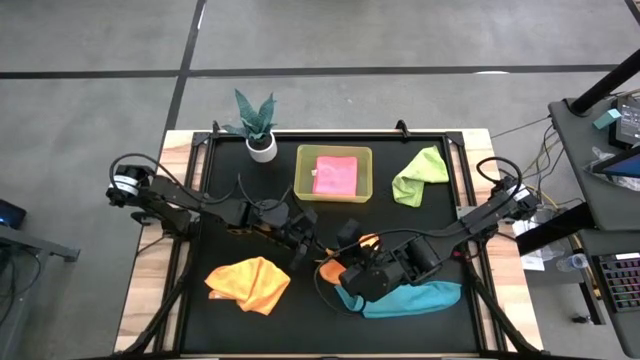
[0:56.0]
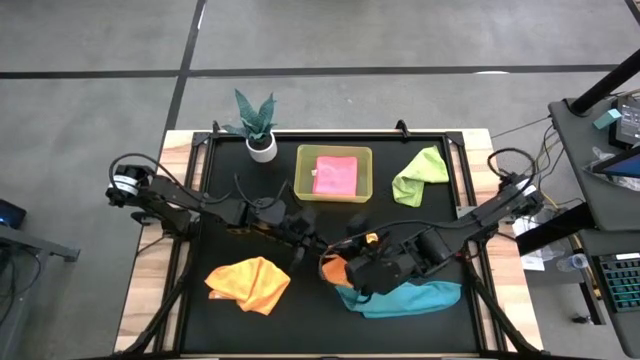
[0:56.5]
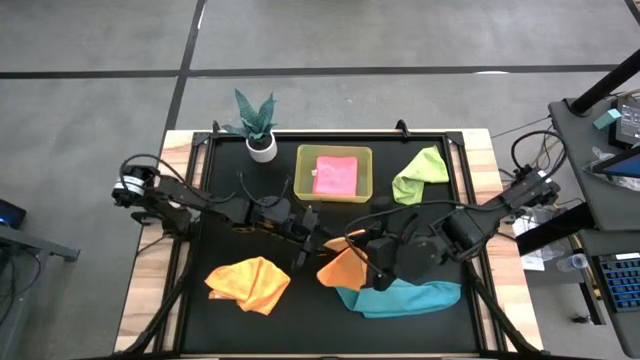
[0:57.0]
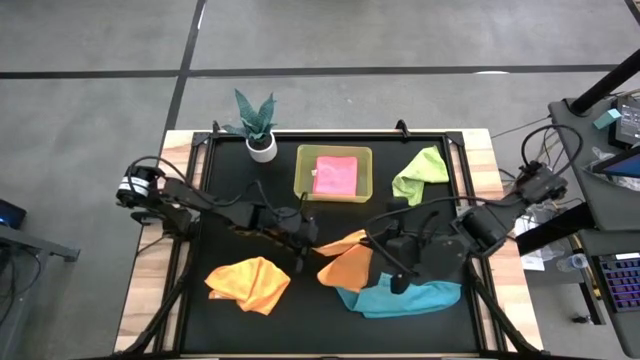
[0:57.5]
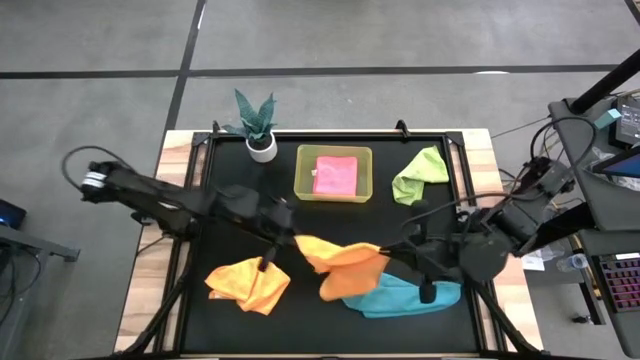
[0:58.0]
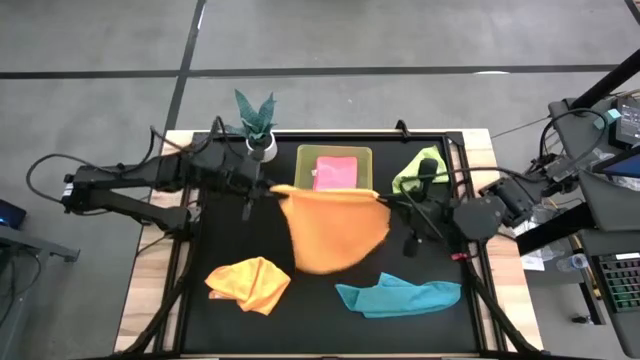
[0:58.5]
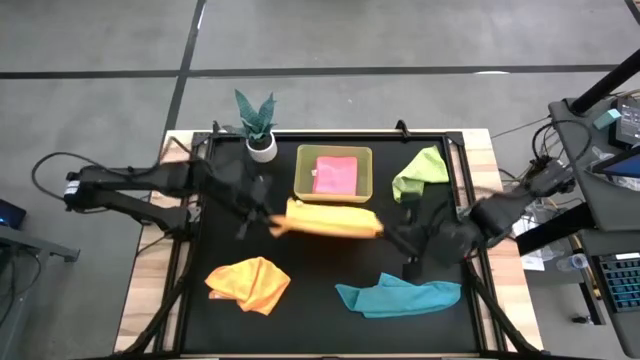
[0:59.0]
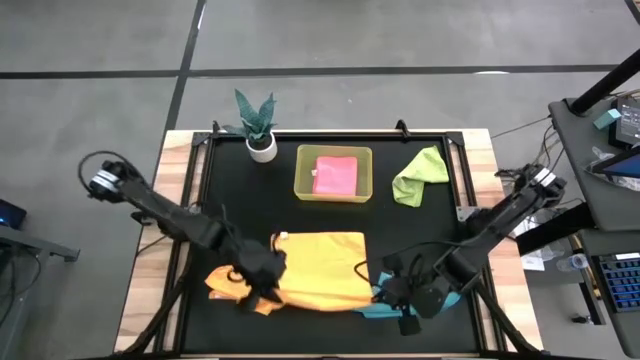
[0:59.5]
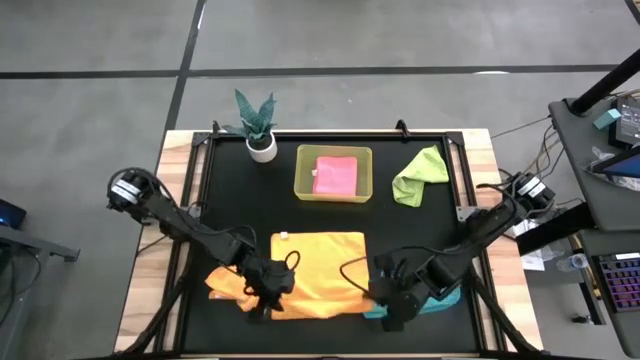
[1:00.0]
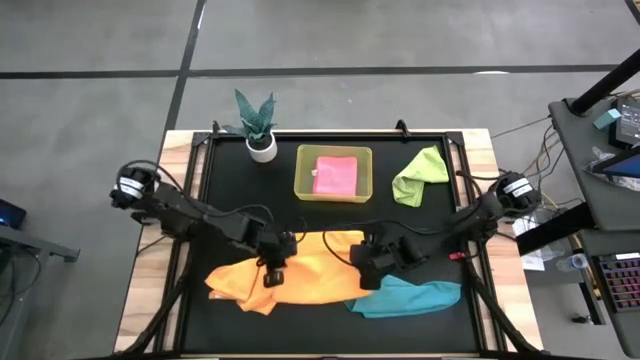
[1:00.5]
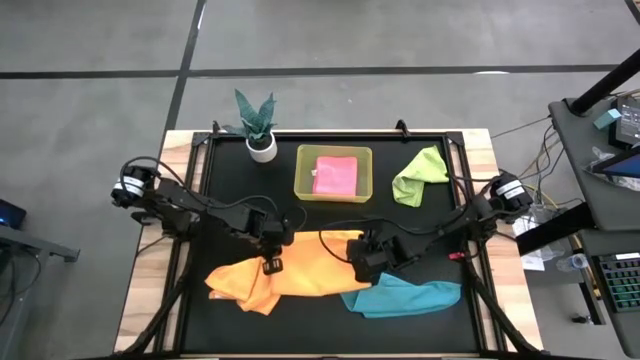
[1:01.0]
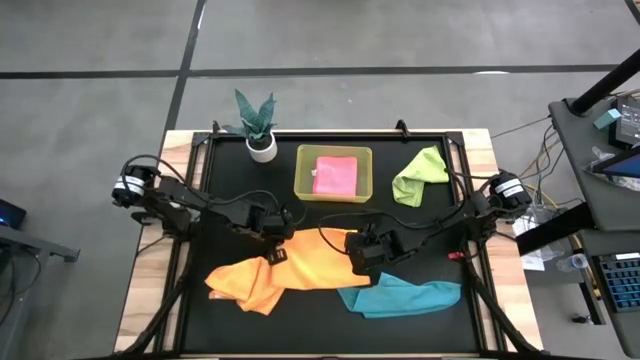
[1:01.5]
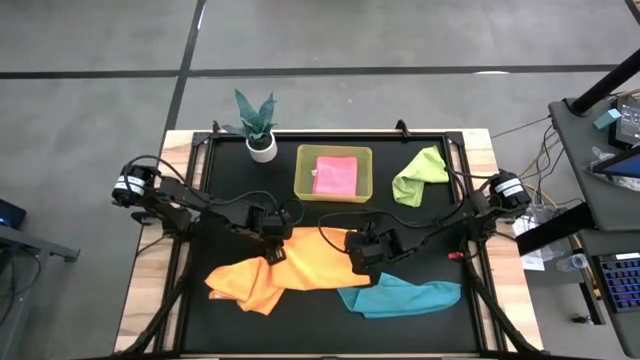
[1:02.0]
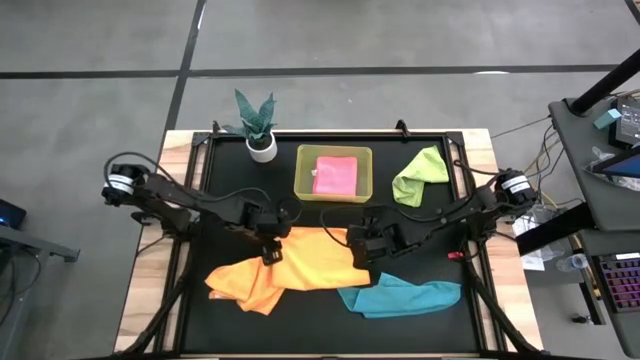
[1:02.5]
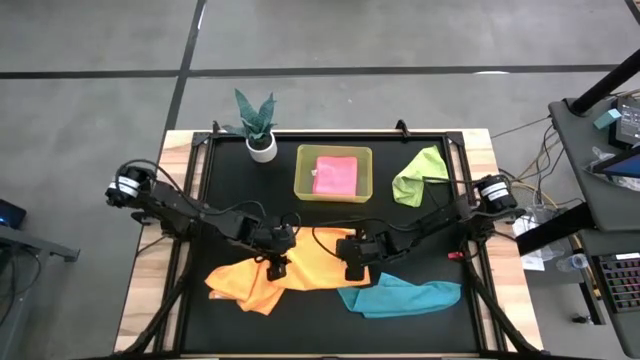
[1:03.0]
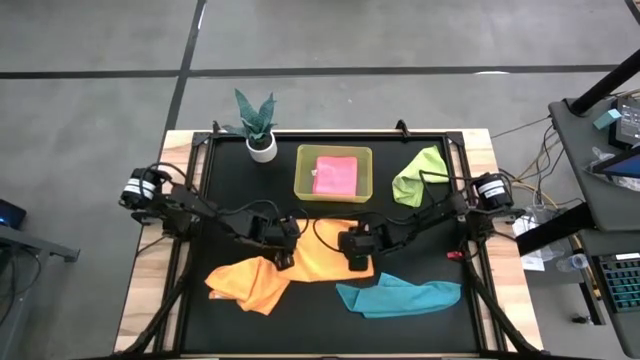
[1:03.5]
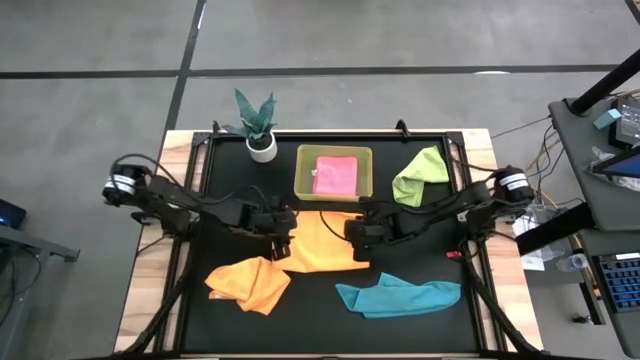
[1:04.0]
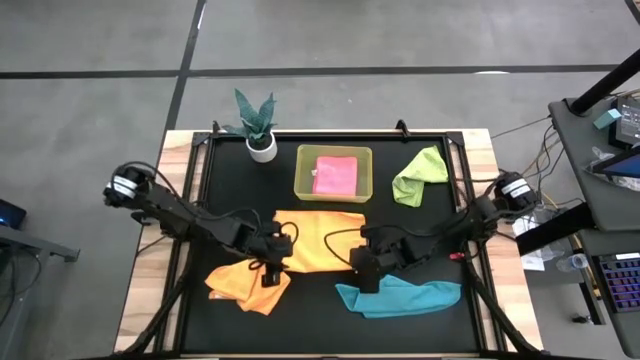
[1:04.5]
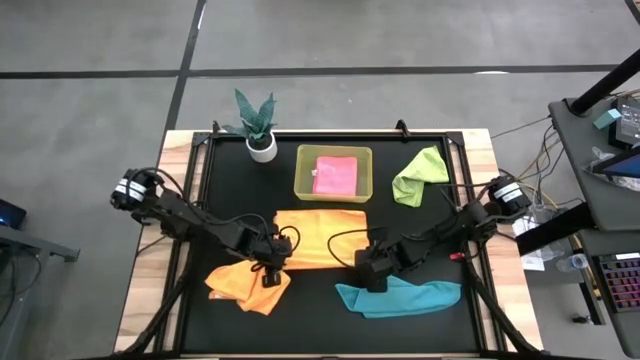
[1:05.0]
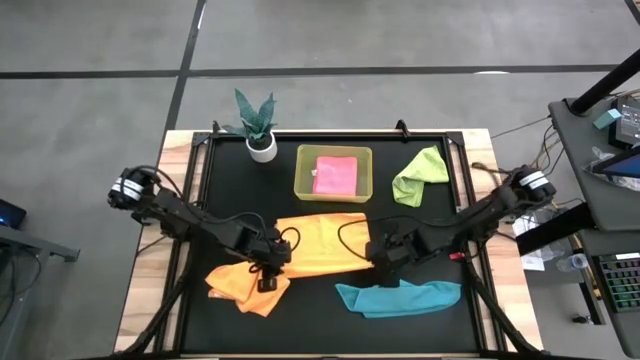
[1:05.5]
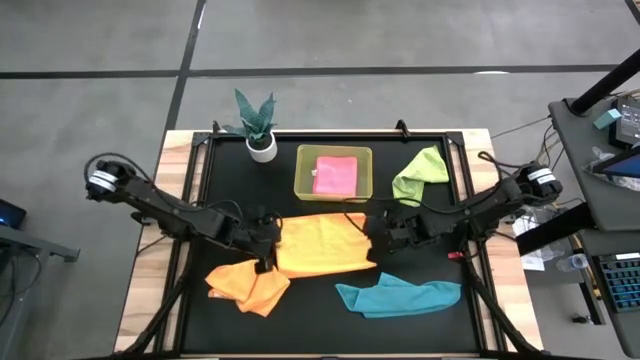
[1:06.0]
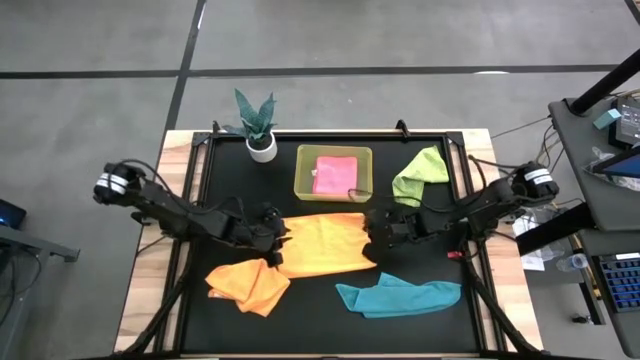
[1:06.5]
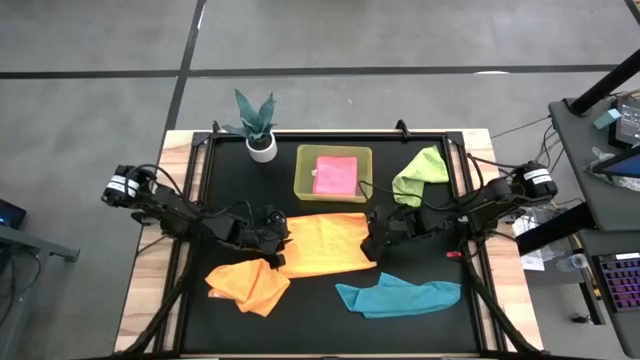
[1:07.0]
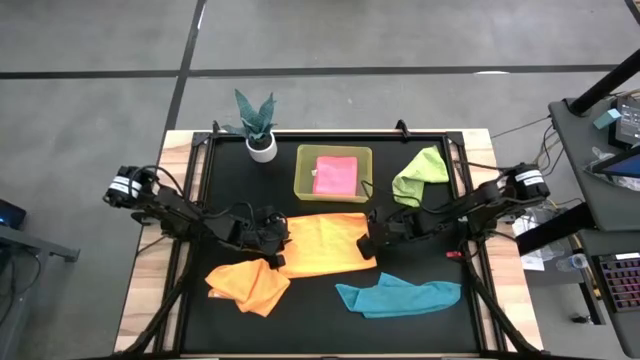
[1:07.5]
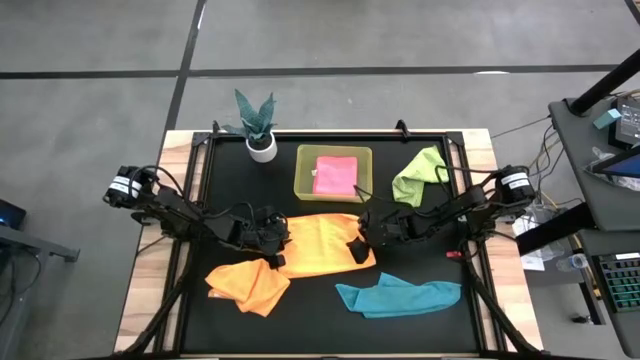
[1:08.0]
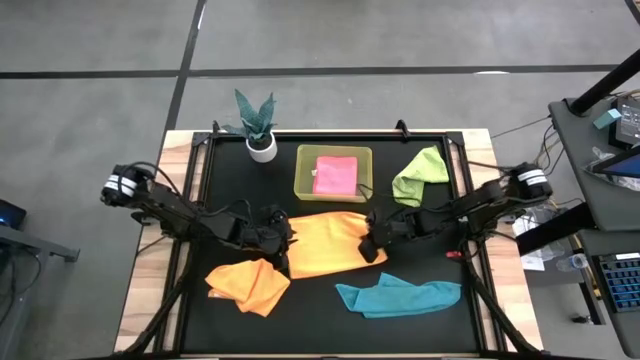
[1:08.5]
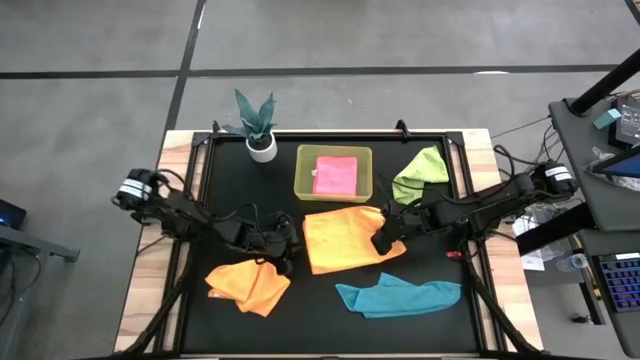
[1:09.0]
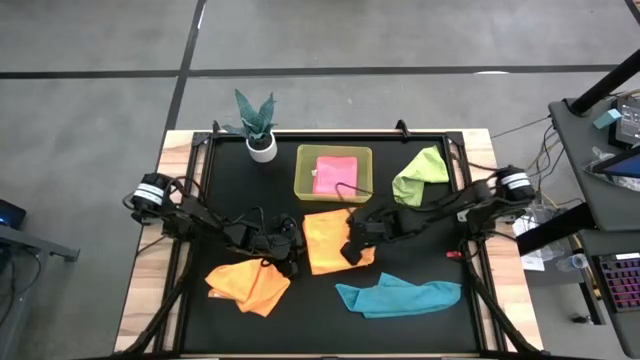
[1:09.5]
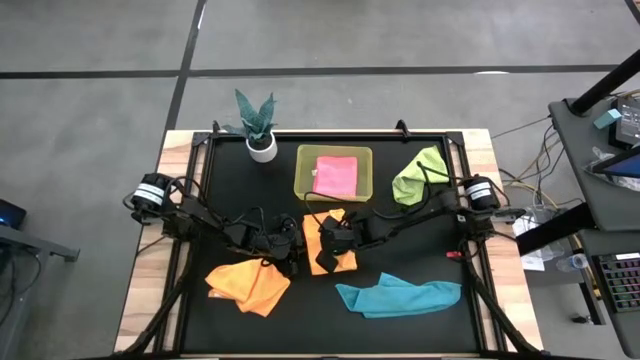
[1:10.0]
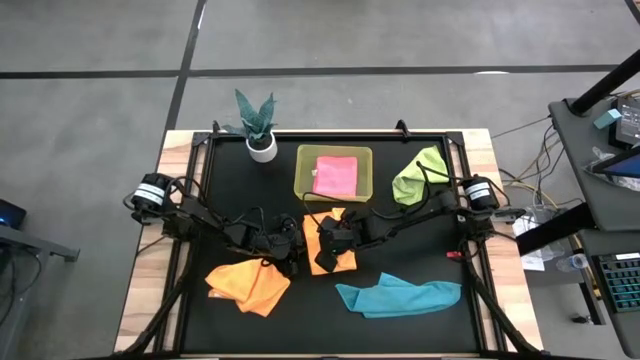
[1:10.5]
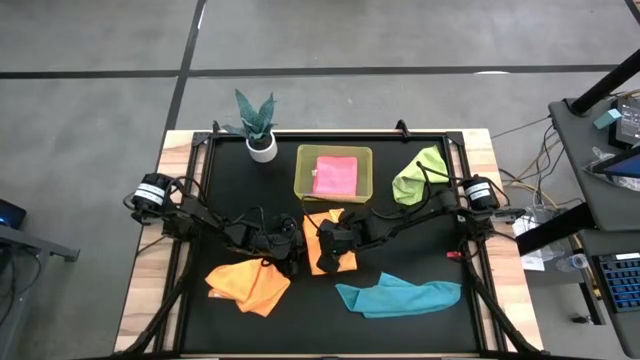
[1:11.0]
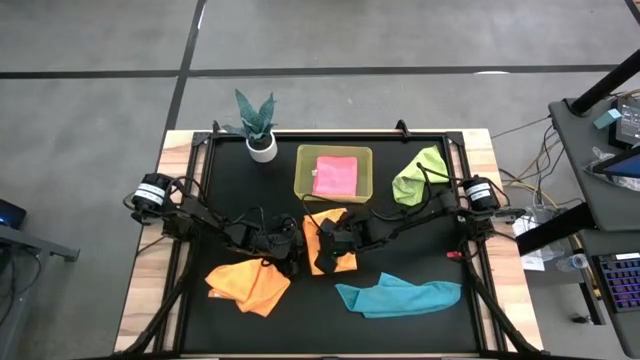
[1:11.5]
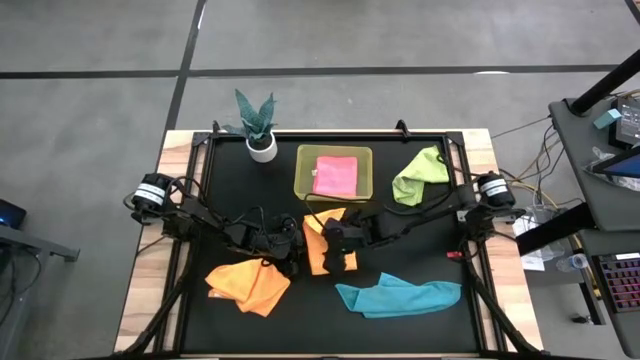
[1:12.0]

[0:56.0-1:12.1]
Task: Fold microfiber towels
Fold the top yellow towel on the table
